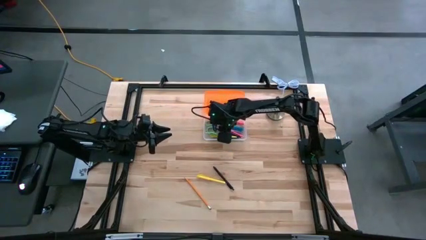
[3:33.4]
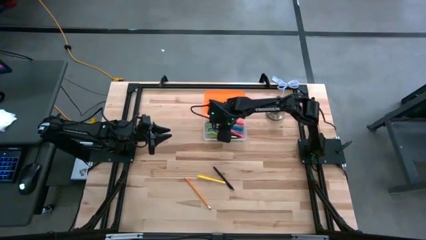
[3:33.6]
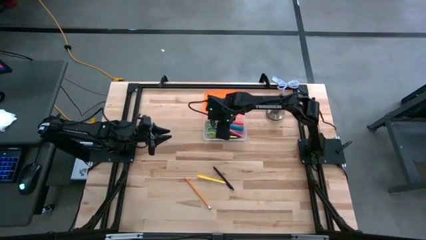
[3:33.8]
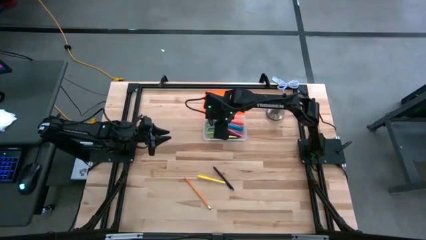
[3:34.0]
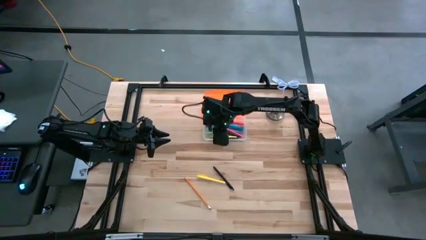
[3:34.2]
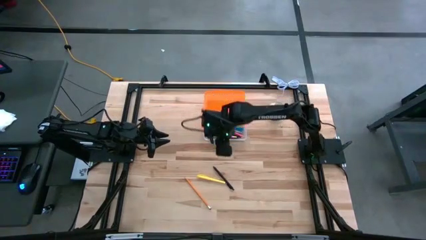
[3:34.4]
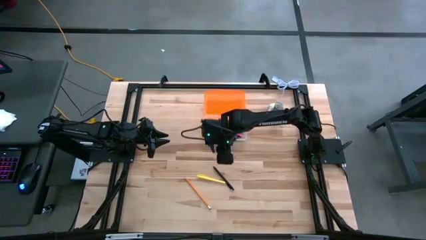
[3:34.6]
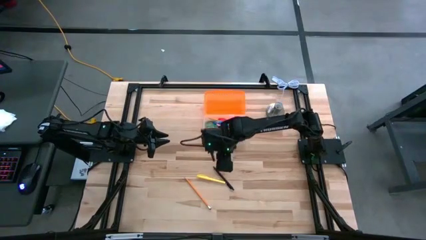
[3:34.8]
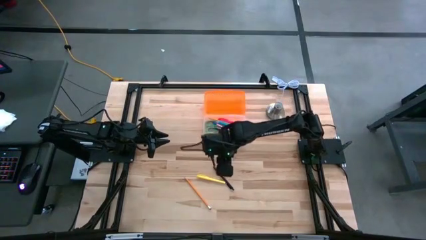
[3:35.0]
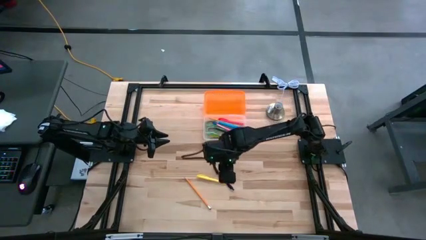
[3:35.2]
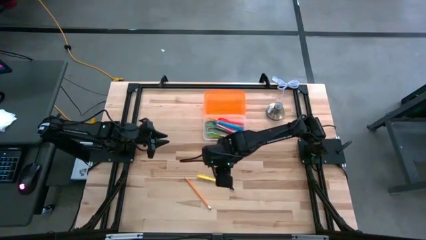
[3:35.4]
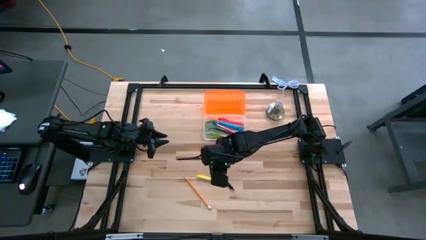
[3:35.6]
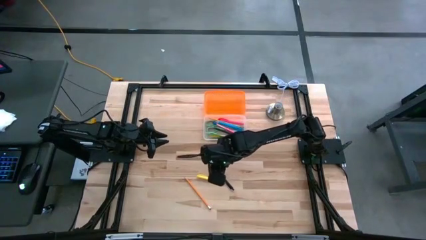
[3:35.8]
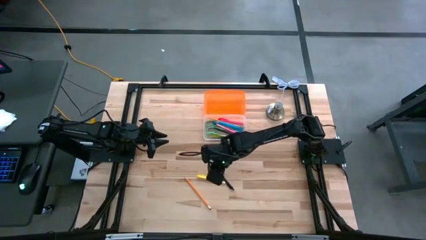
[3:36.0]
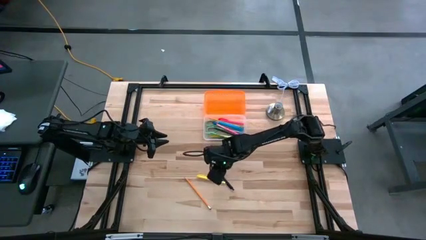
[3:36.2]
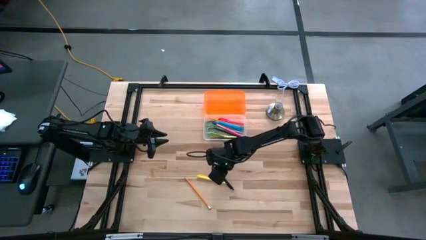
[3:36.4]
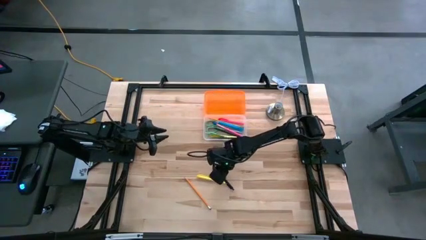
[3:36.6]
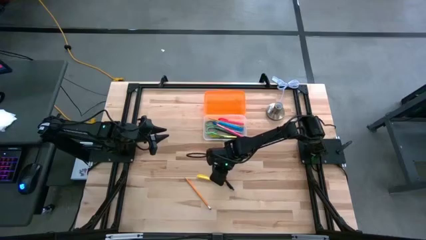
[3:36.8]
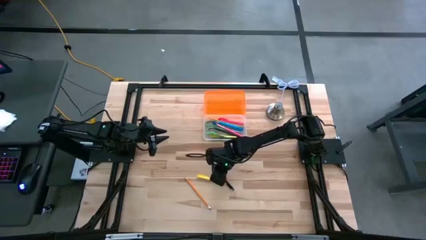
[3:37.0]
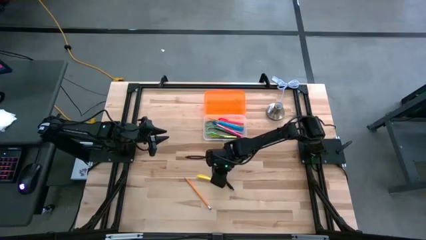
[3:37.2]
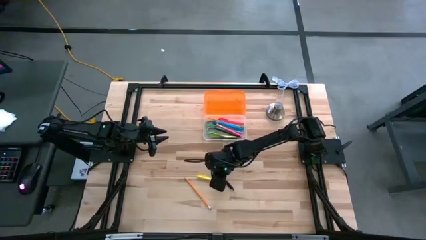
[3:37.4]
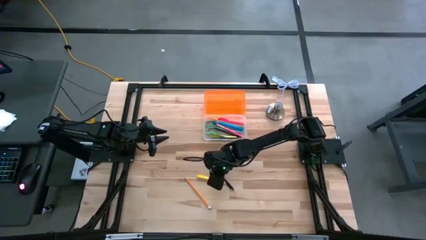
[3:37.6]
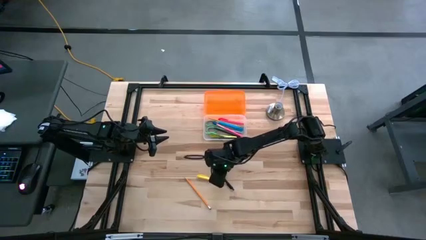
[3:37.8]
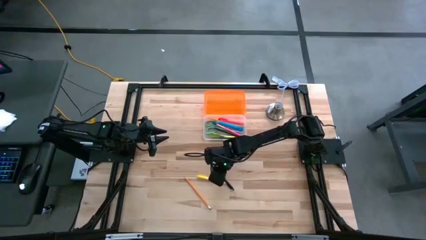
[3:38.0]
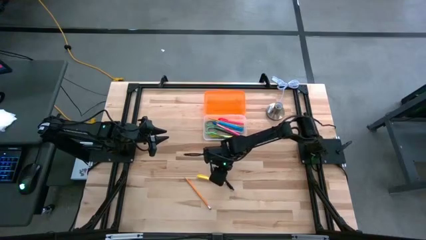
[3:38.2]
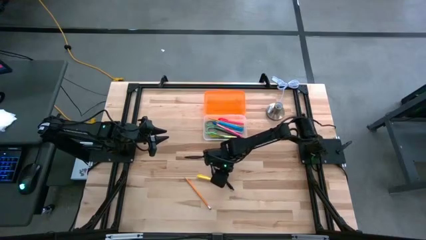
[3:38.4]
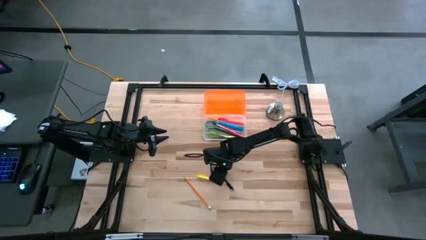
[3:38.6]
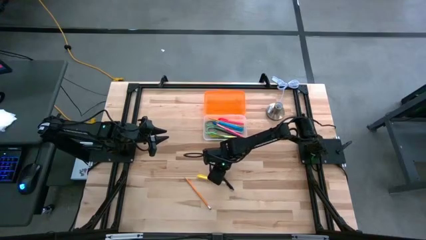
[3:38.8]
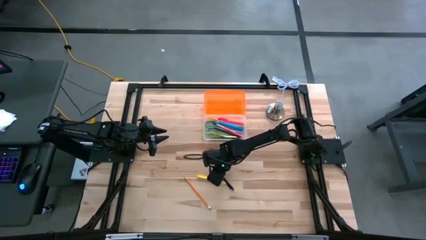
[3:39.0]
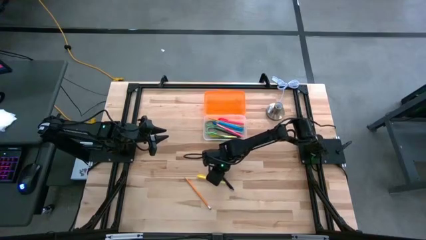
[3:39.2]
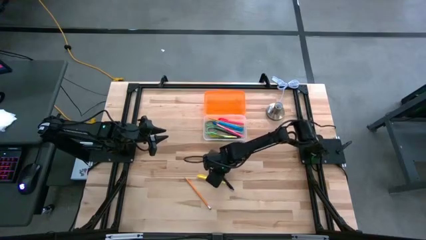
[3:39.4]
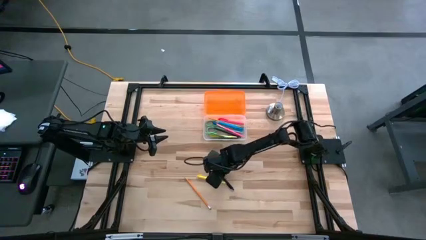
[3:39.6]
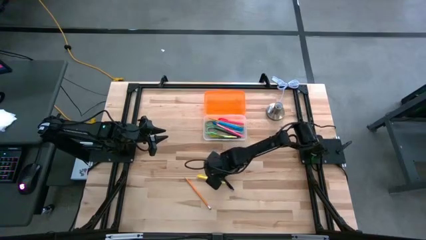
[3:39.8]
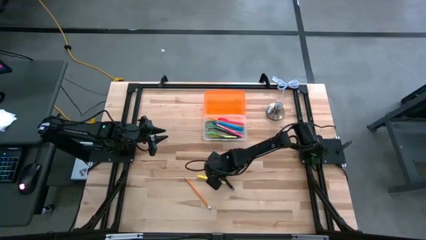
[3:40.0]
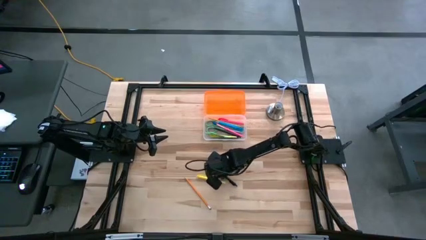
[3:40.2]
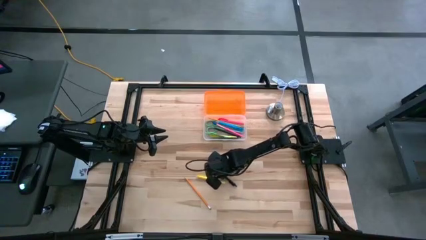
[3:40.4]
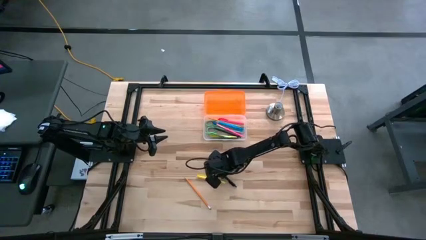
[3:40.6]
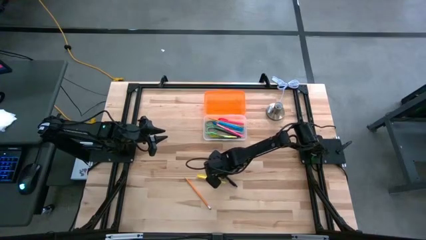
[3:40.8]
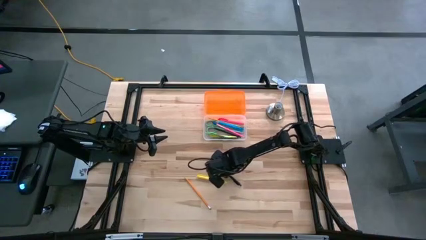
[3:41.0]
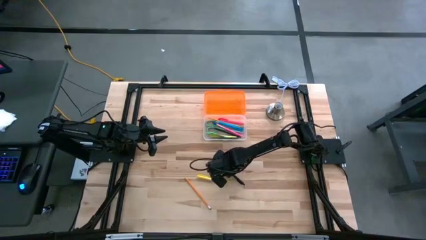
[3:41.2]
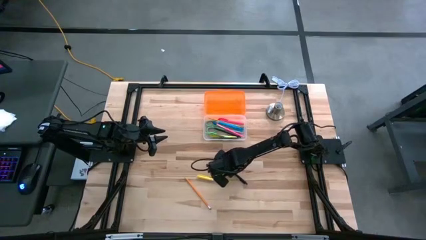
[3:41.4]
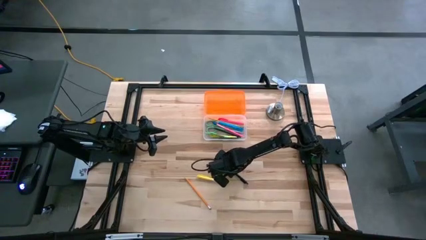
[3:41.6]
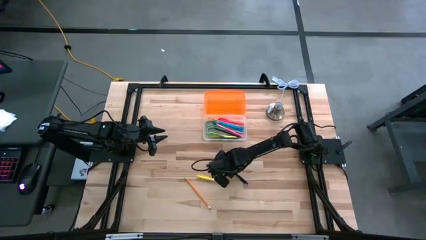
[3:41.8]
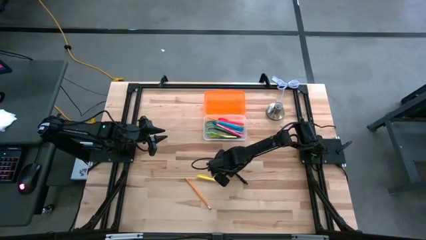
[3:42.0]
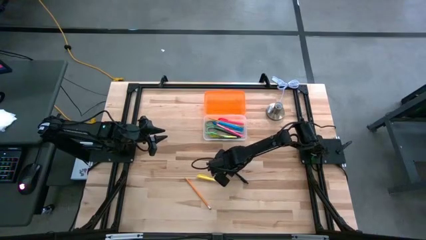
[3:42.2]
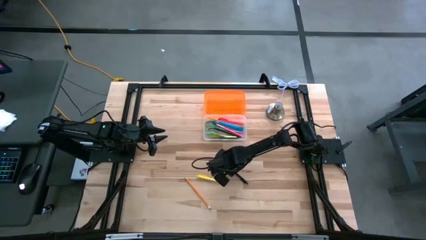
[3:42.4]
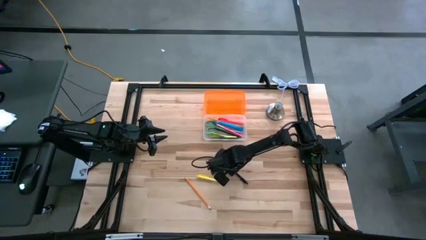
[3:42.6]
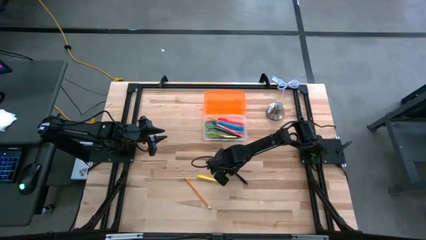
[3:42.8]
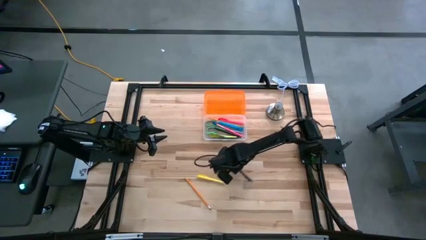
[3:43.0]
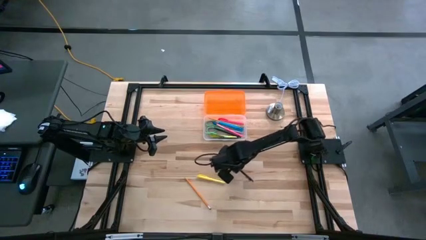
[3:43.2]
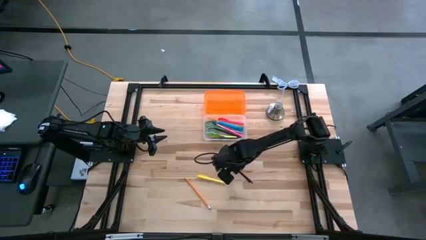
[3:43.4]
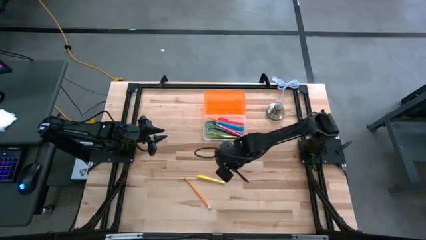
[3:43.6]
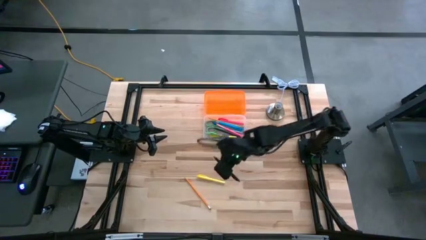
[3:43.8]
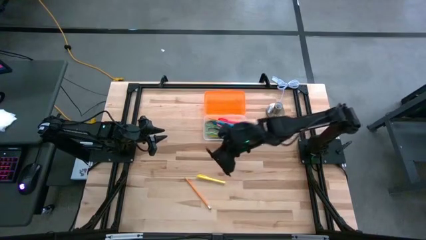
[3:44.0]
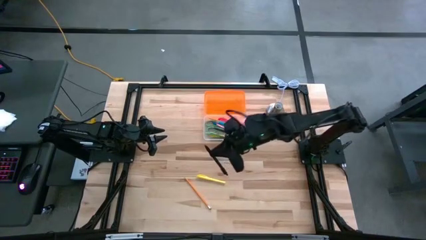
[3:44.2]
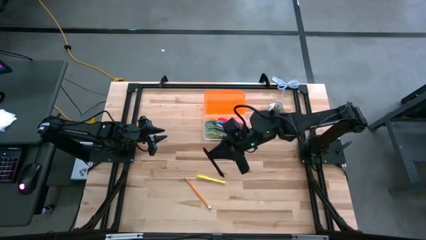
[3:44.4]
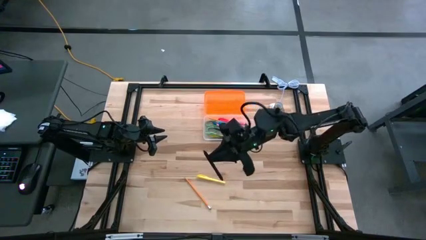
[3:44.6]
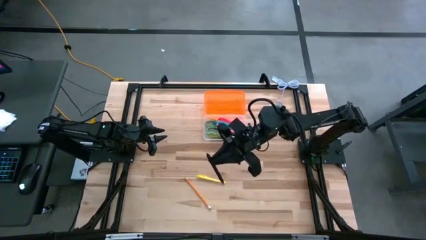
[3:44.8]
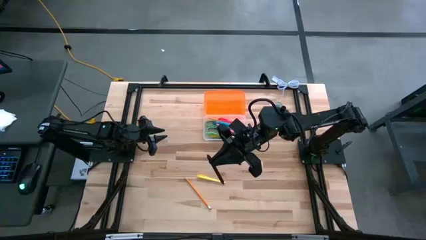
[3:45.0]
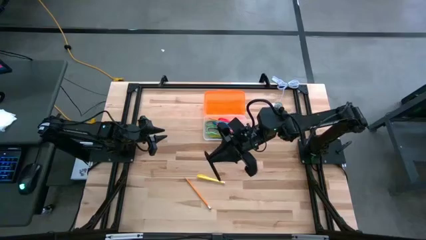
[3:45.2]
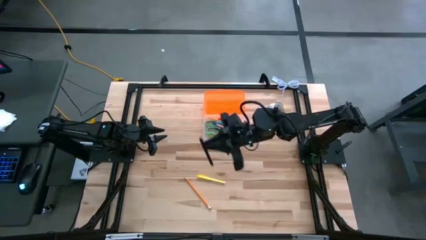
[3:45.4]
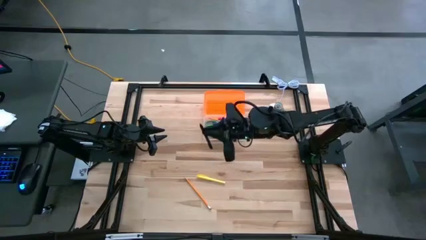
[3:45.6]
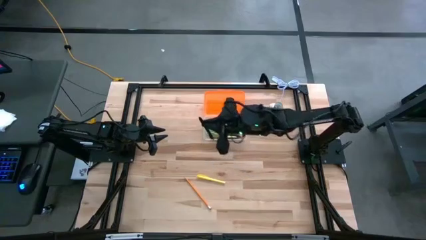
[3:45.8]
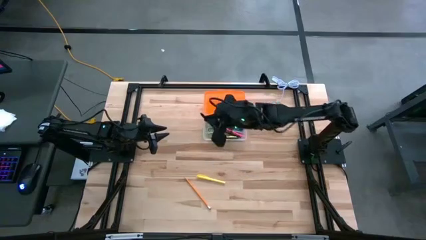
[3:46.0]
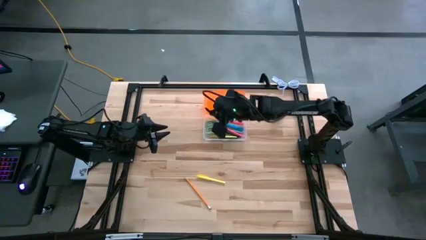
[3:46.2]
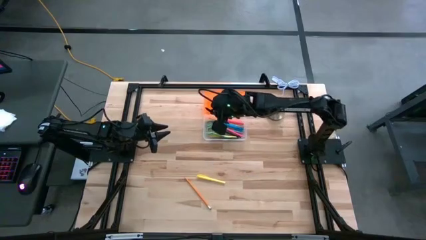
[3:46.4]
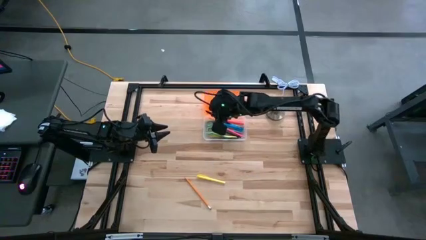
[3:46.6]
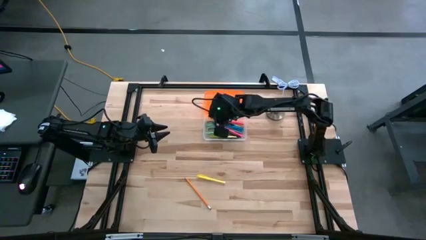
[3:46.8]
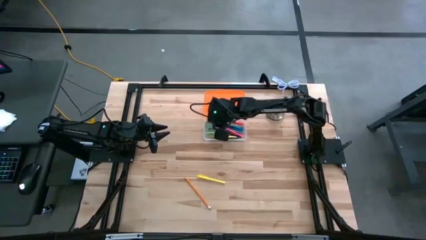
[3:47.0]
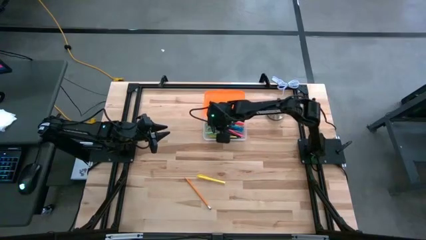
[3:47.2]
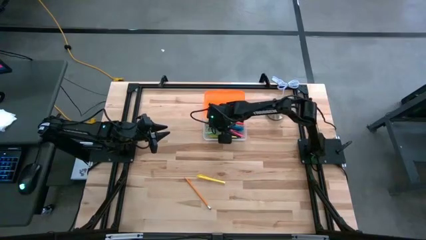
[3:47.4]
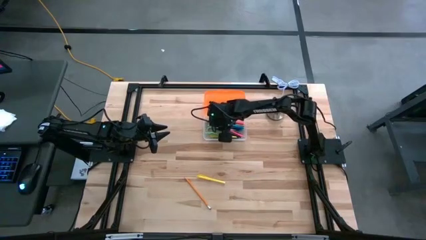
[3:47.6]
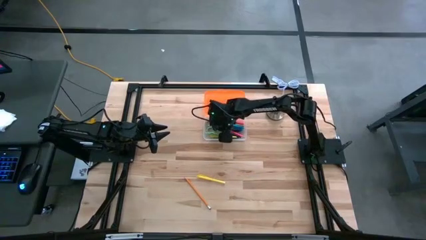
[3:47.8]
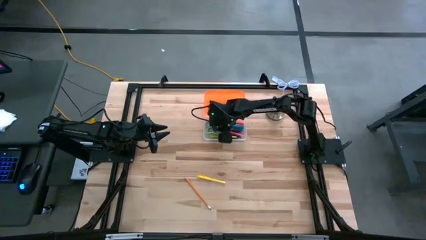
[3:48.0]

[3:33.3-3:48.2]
Task: Pick & place school supplies into a supply box
Put the black pen into the supply box

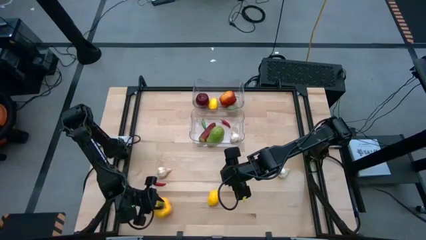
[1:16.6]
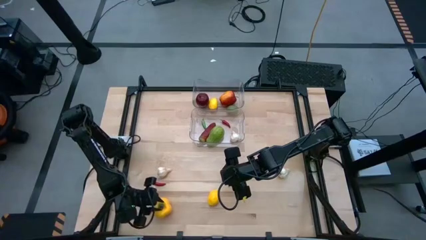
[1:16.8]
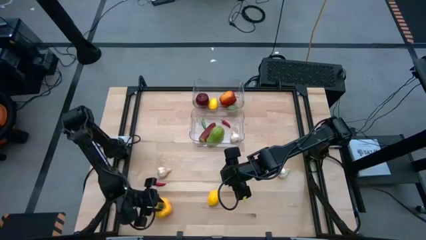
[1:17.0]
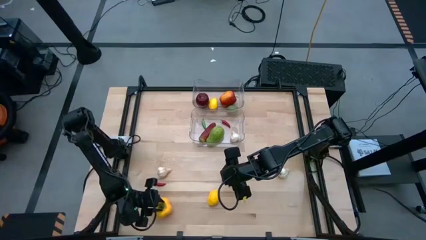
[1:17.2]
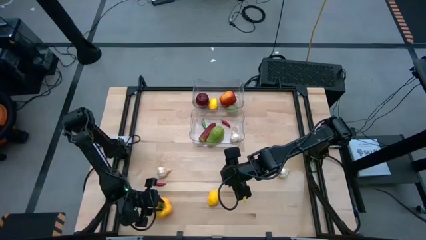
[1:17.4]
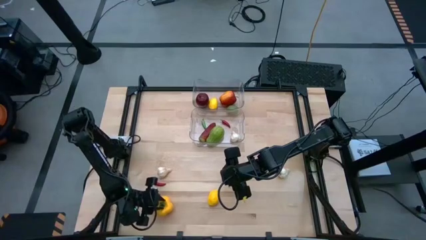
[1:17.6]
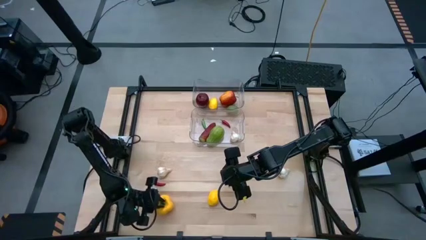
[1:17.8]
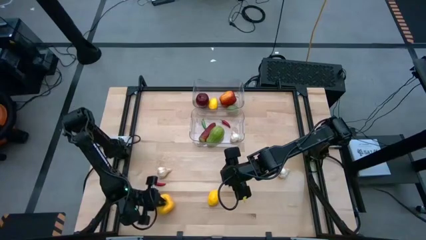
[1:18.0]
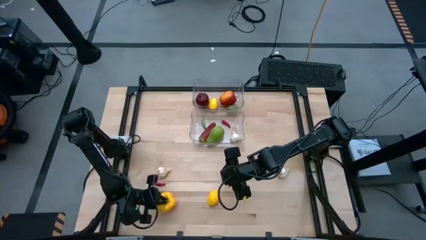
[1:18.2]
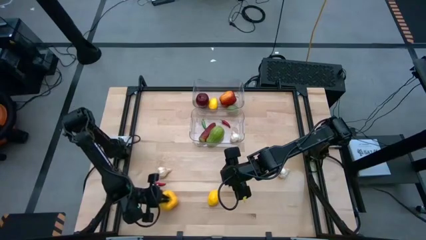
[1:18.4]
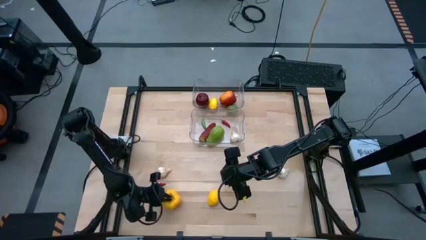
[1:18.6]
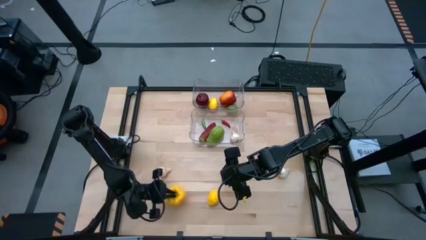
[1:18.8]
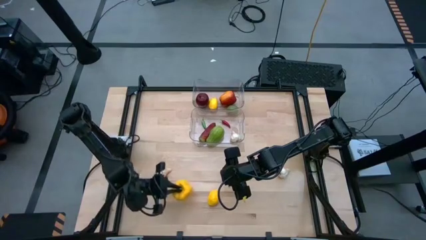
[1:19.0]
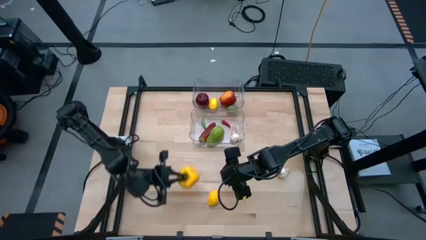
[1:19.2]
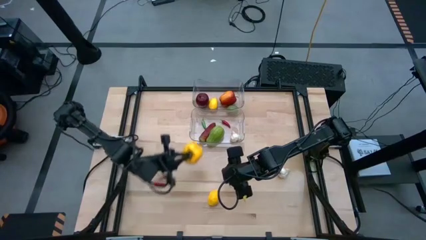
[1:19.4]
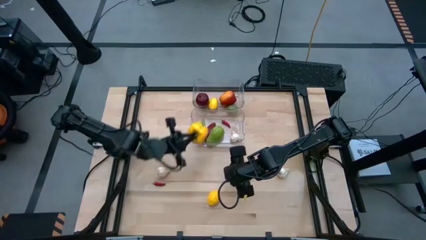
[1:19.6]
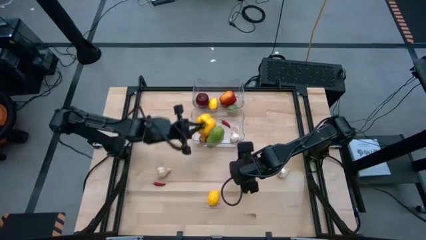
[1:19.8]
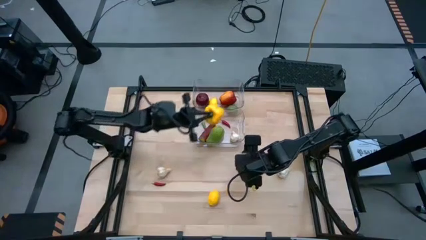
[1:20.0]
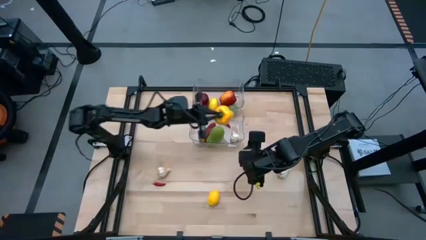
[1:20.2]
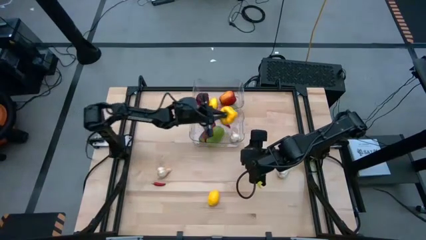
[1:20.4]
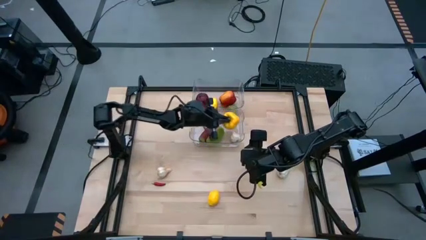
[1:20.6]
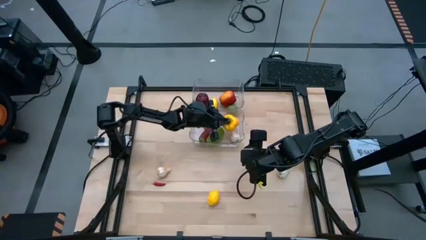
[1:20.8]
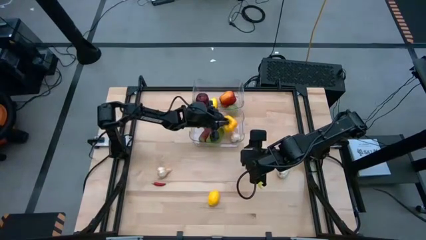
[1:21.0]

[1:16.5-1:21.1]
Task: Sort produce into baskets
Put the yellow bell pepper into the bottom transparent bin
